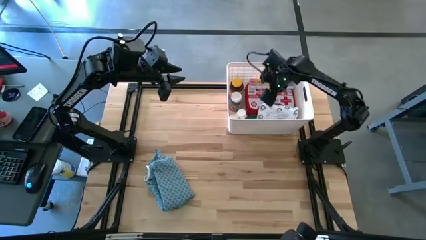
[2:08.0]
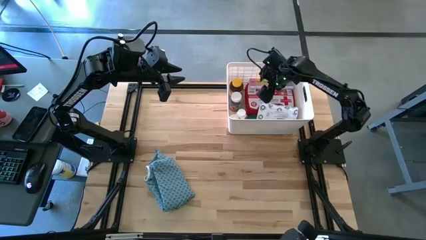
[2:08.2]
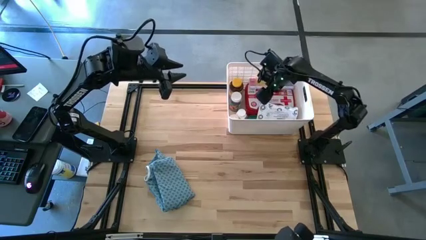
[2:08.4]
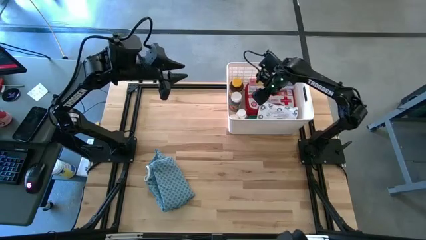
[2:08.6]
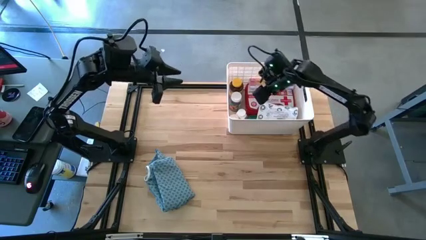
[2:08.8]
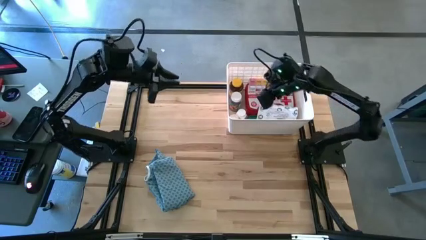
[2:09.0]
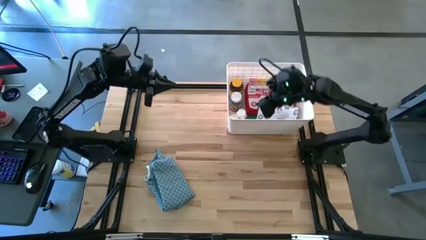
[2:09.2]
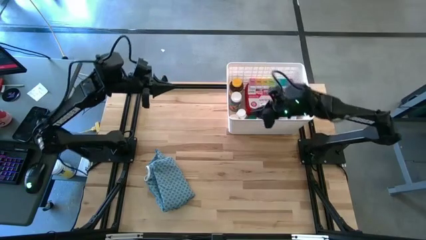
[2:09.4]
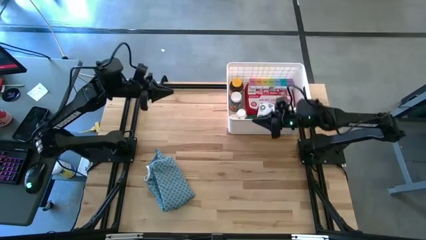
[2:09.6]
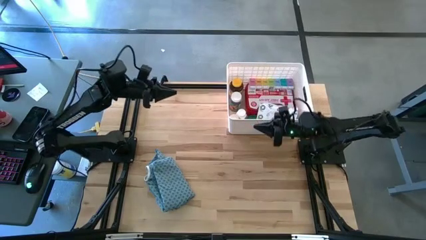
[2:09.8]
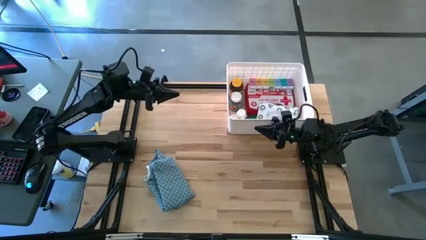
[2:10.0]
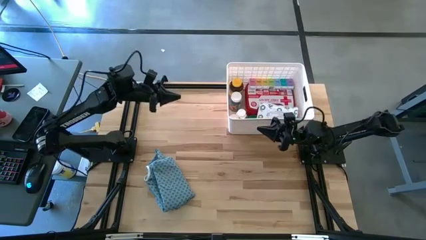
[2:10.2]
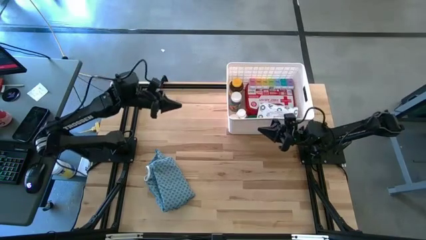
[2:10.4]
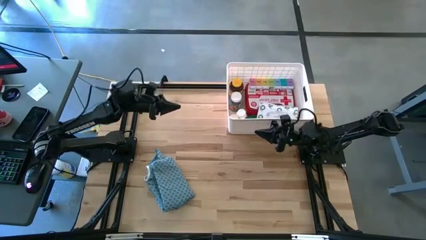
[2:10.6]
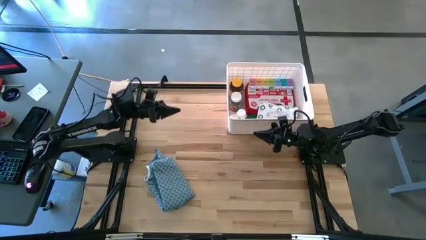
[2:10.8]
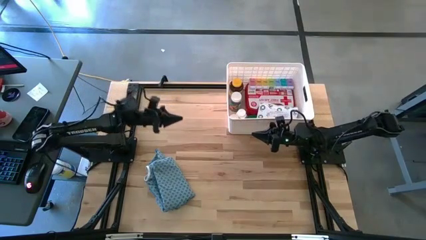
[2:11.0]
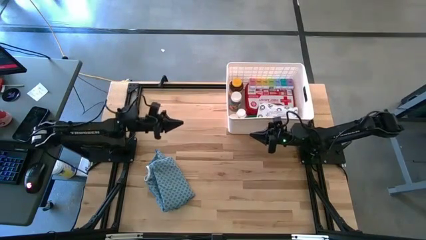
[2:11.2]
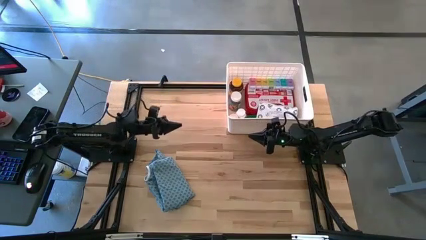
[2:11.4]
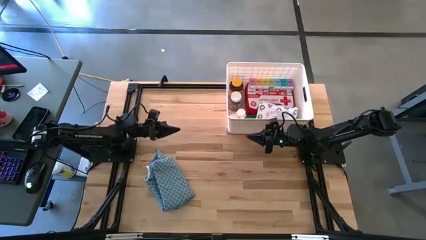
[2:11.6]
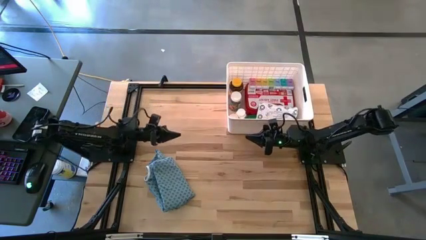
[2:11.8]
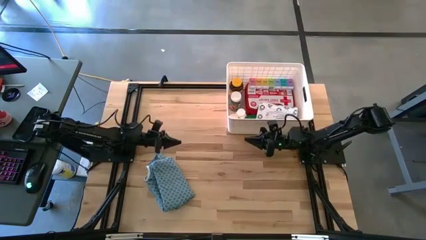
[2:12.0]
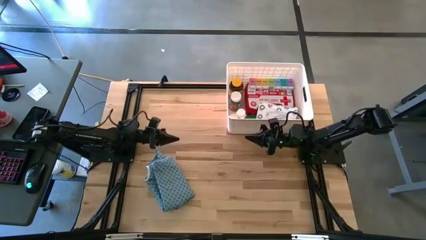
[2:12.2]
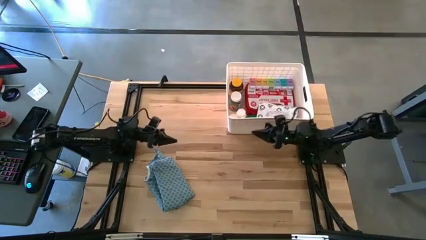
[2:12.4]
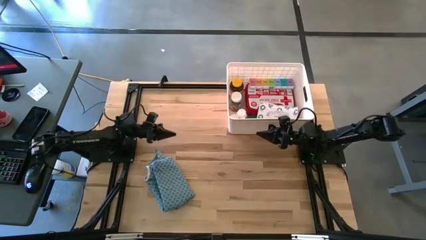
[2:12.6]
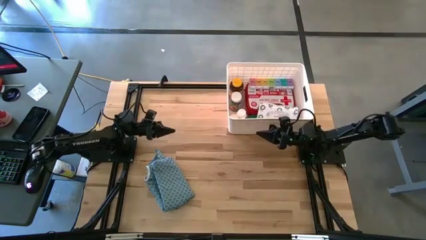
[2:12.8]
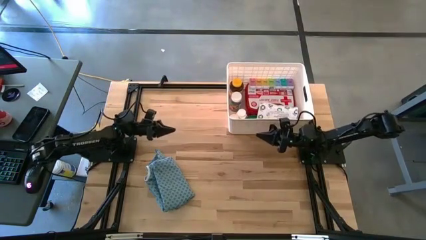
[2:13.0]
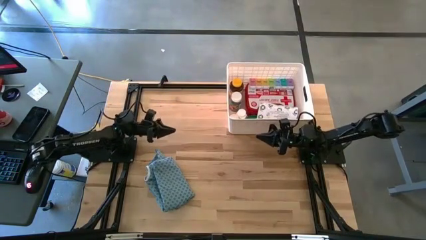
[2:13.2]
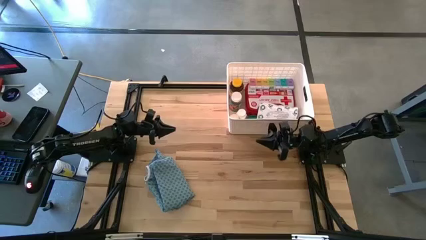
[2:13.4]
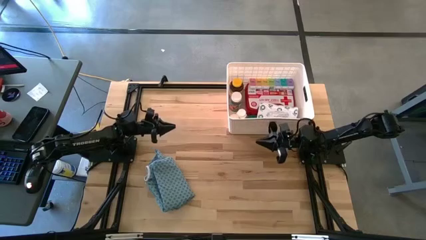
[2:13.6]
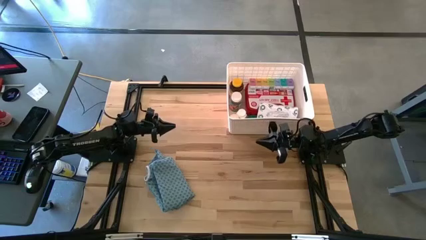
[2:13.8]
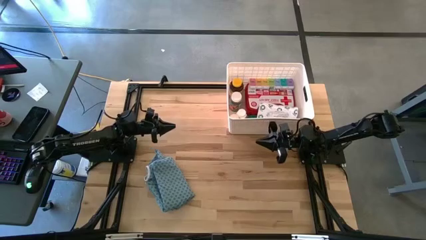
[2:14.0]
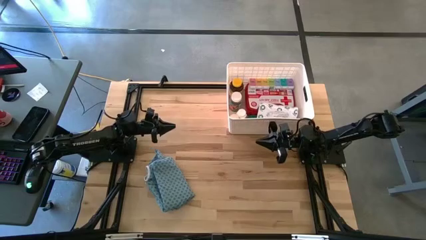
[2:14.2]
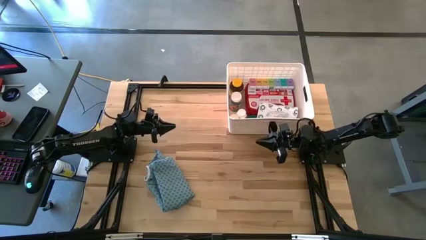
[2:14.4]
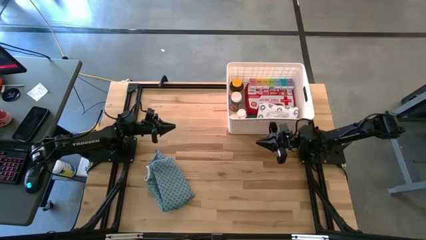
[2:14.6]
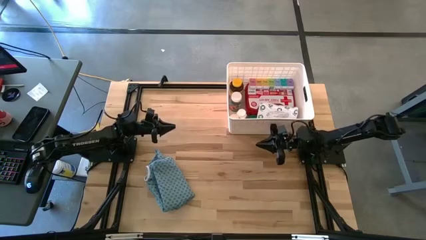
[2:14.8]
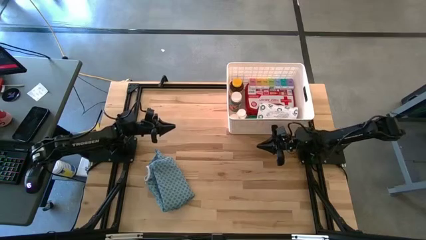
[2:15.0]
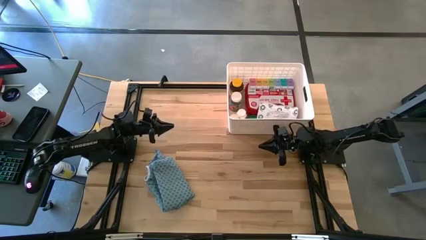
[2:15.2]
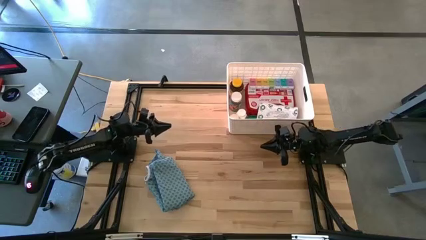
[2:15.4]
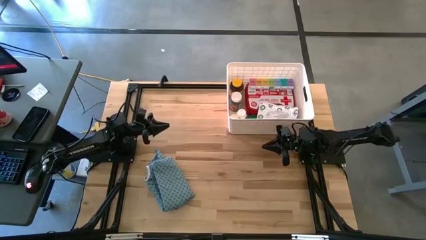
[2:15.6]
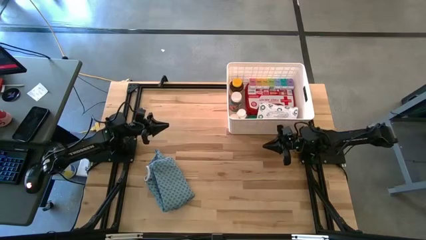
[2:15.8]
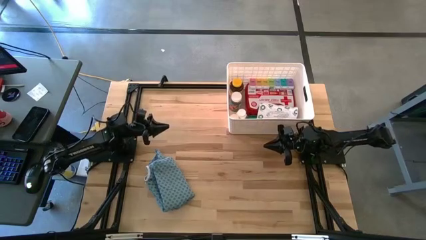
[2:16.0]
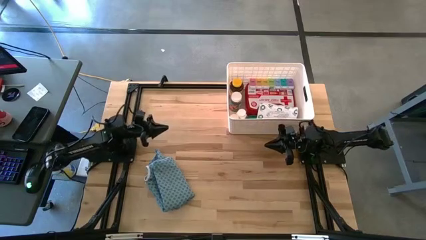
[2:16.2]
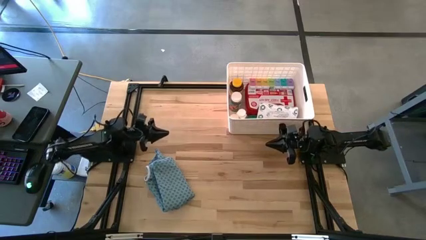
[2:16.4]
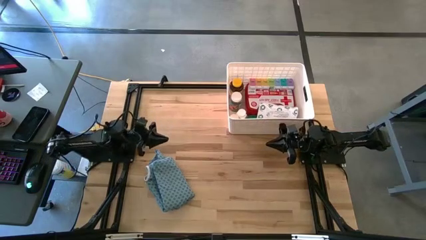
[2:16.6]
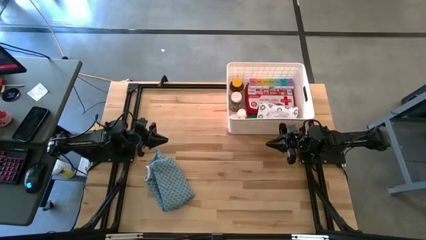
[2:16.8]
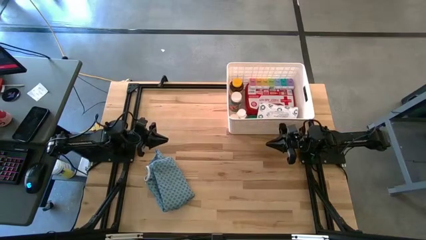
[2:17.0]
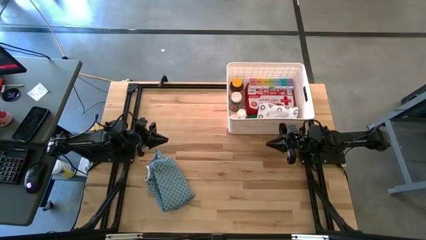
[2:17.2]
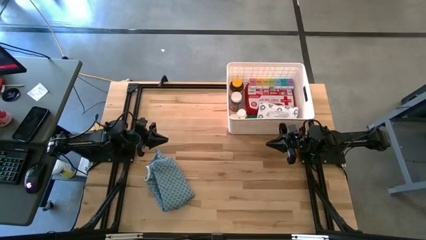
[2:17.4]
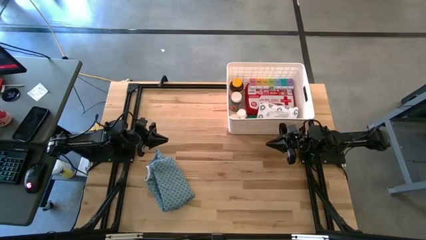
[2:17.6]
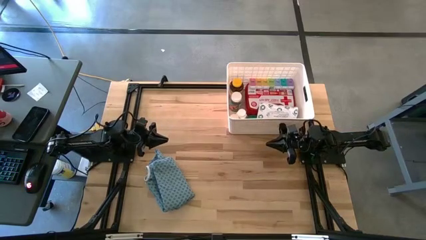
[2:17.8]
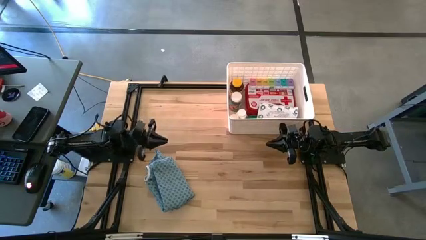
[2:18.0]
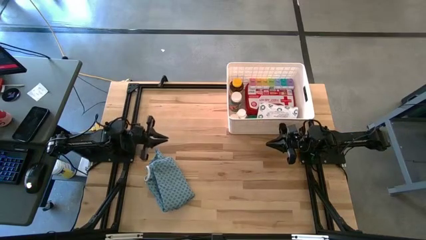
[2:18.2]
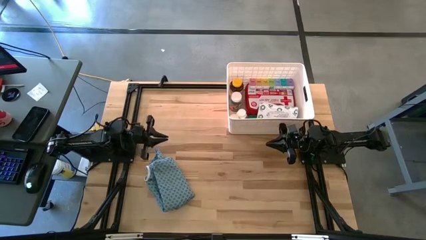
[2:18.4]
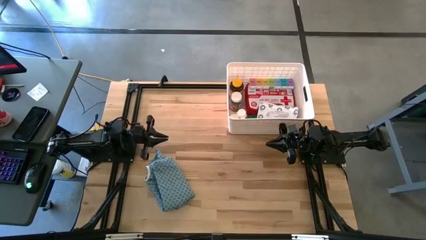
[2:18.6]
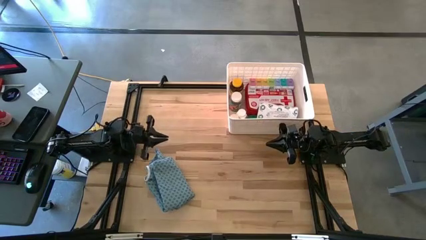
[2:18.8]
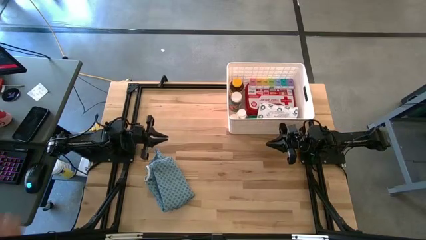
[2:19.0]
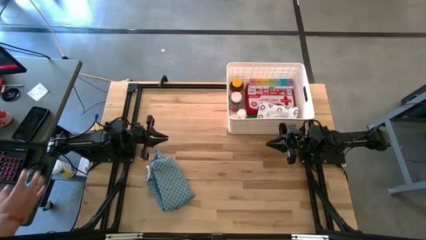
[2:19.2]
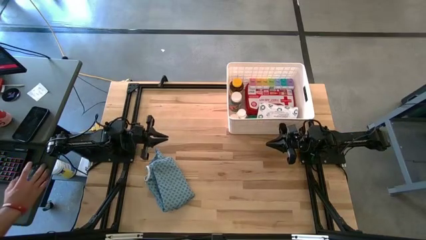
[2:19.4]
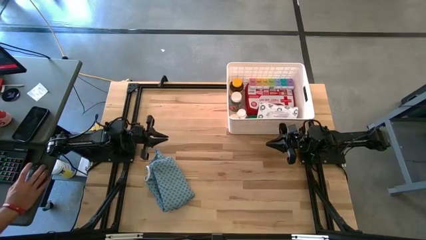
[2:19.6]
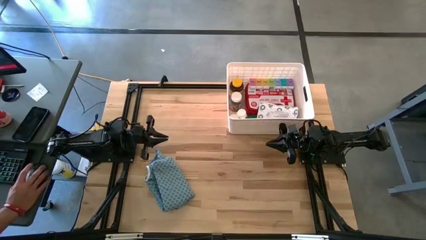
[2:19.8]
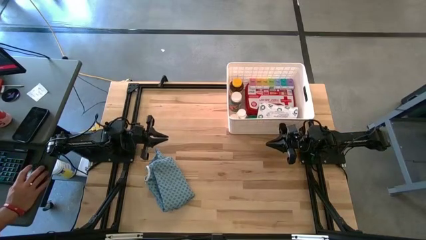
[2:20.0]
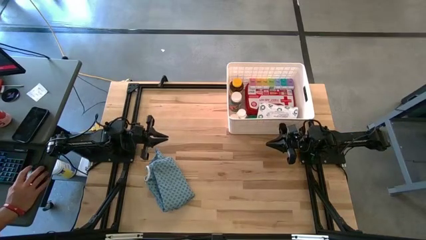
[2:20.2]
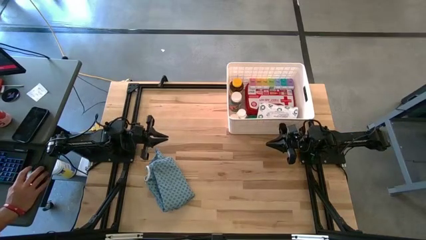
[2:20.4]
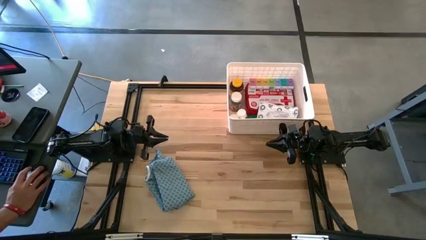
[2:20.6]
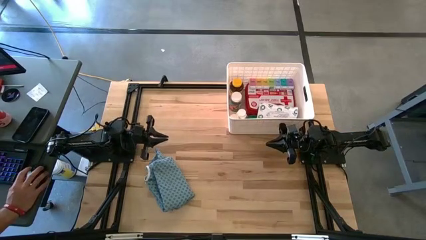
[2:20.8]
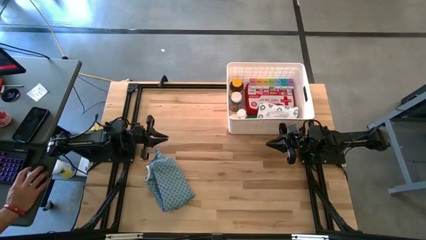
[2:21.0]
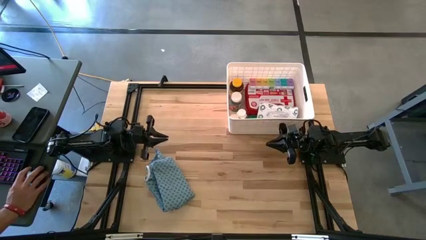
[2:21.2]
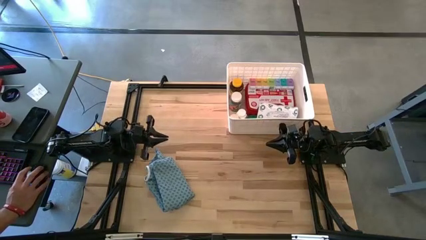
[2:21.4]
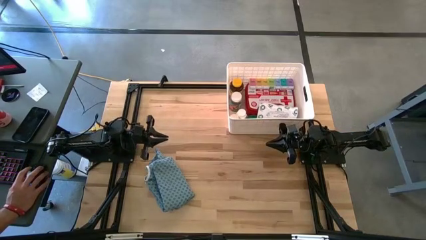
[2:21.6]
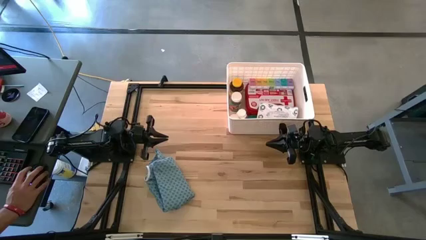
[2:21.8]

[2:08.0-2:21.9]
Task: Pick & place medical supplies in basket/bin
Return to Home Position
